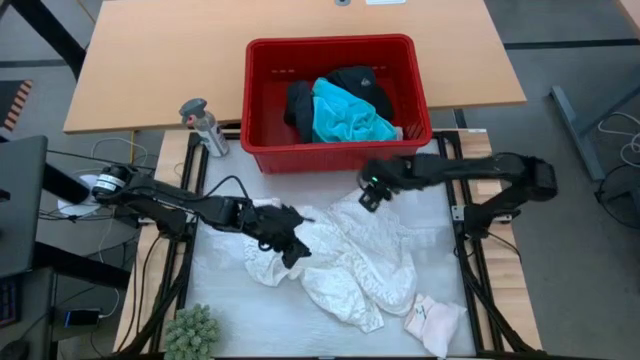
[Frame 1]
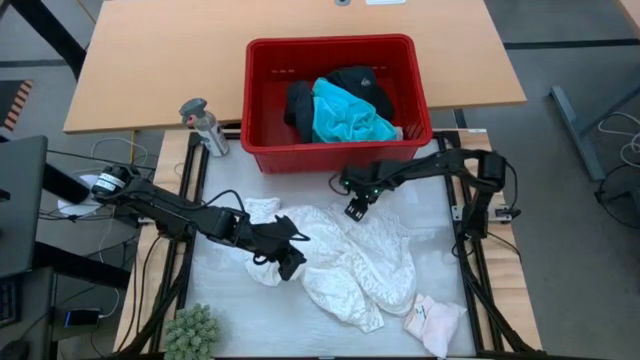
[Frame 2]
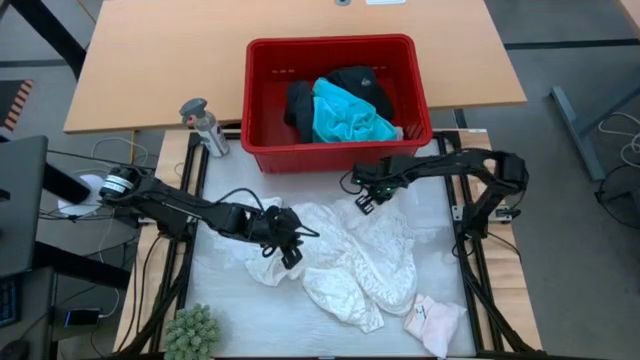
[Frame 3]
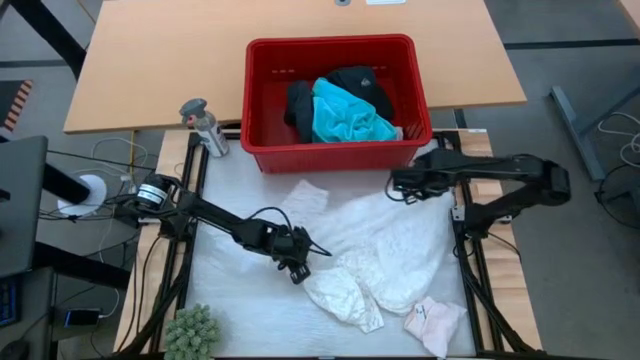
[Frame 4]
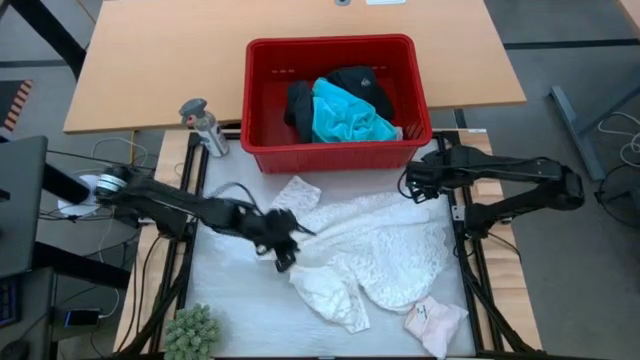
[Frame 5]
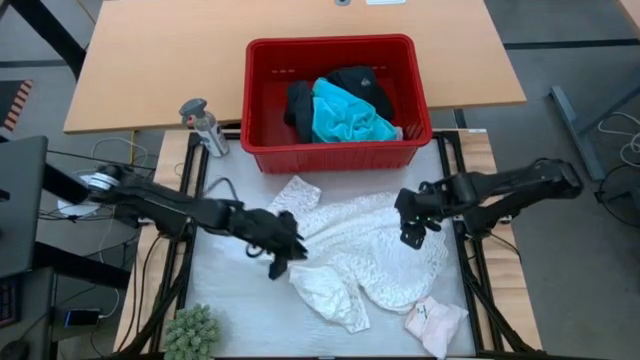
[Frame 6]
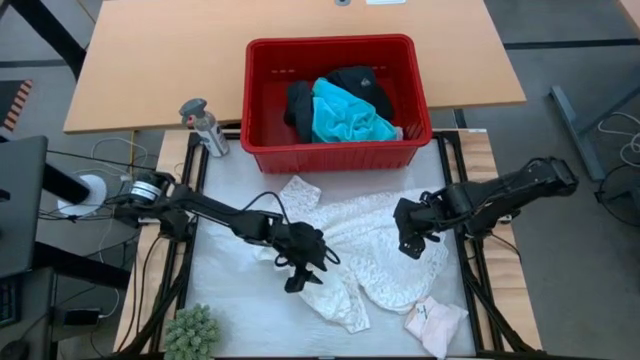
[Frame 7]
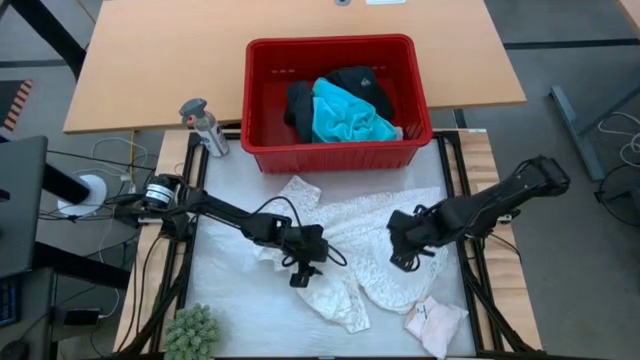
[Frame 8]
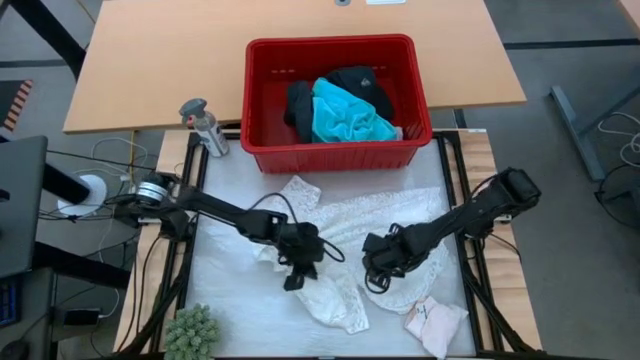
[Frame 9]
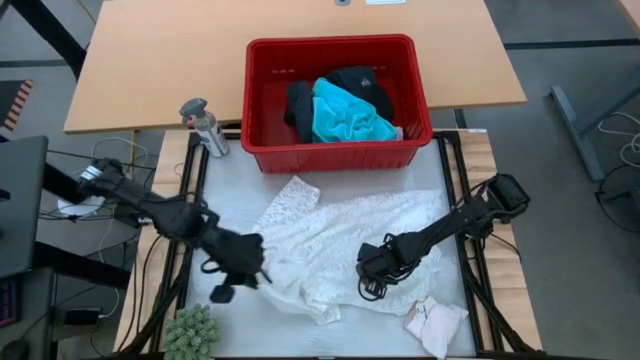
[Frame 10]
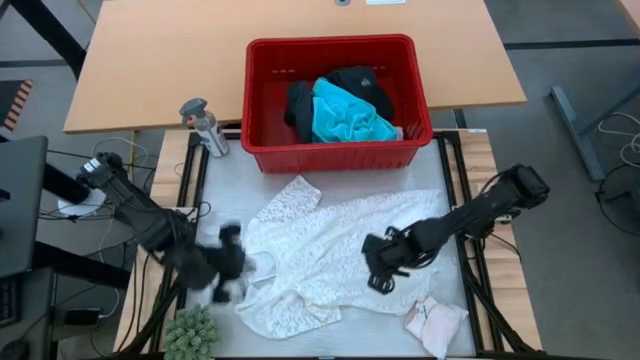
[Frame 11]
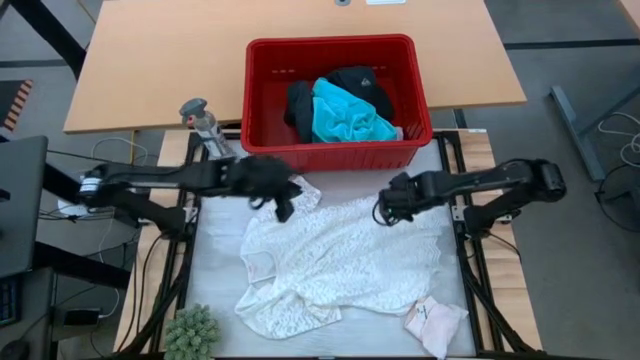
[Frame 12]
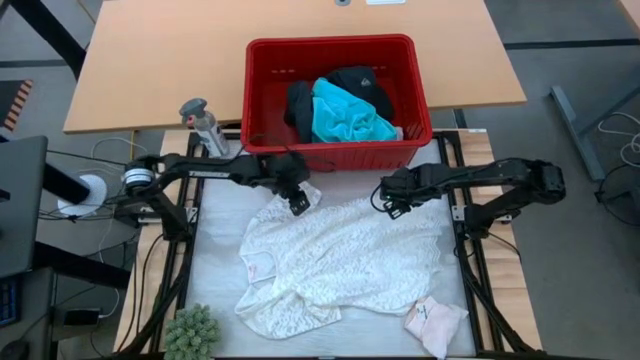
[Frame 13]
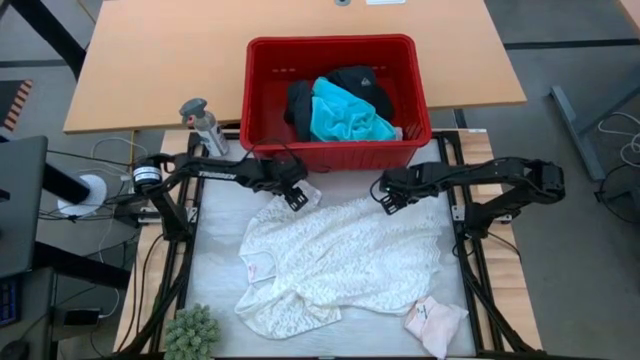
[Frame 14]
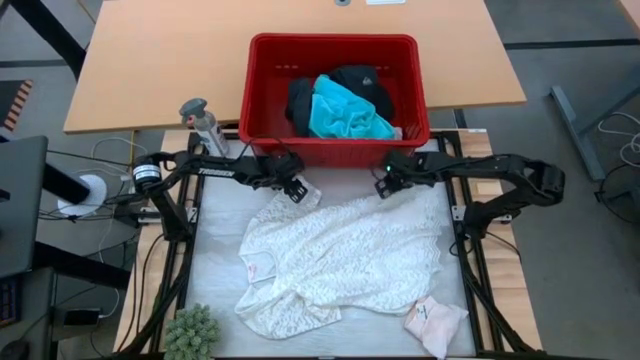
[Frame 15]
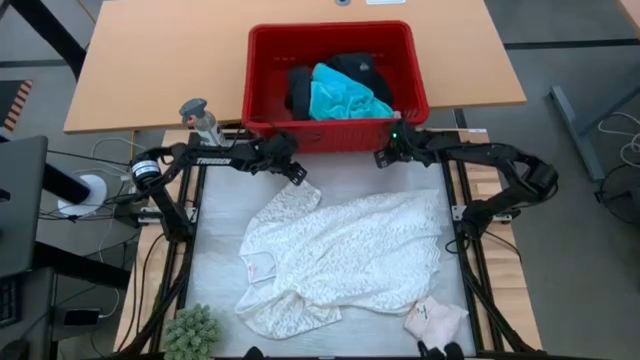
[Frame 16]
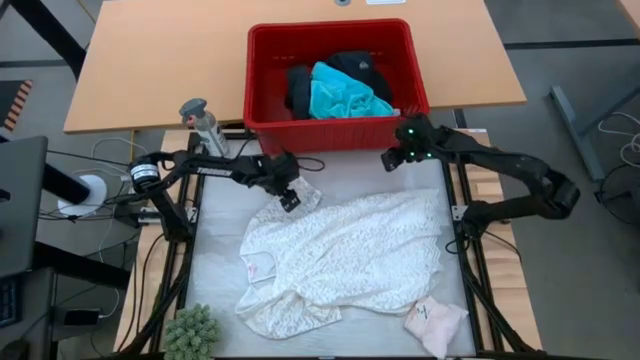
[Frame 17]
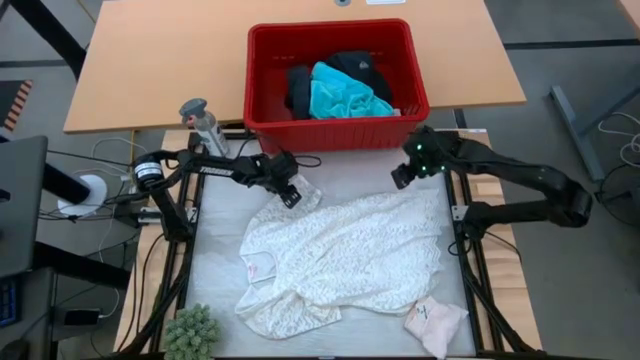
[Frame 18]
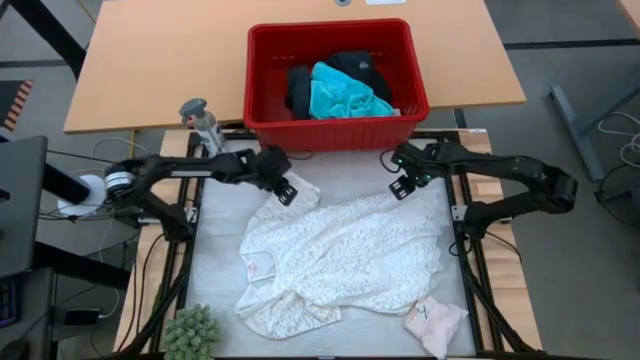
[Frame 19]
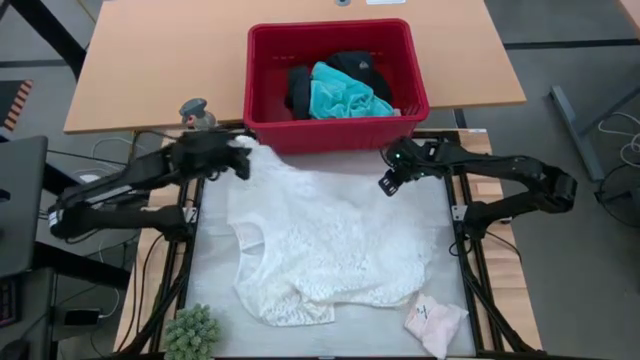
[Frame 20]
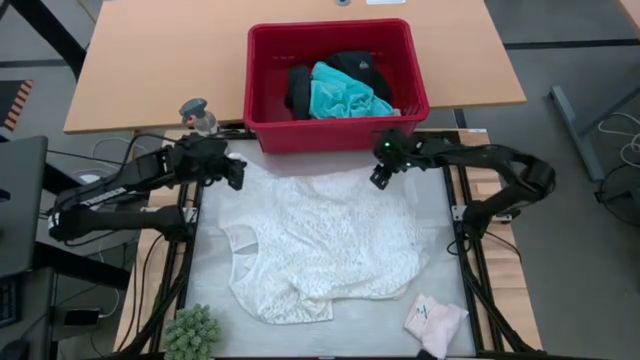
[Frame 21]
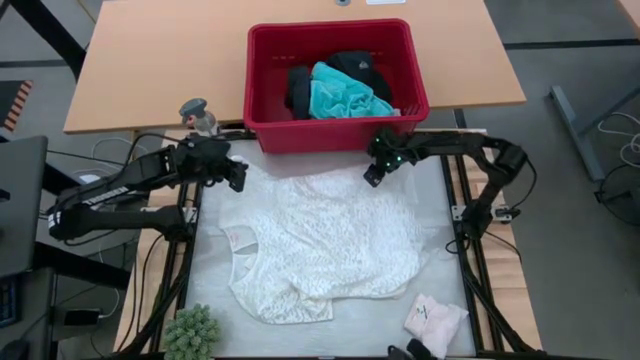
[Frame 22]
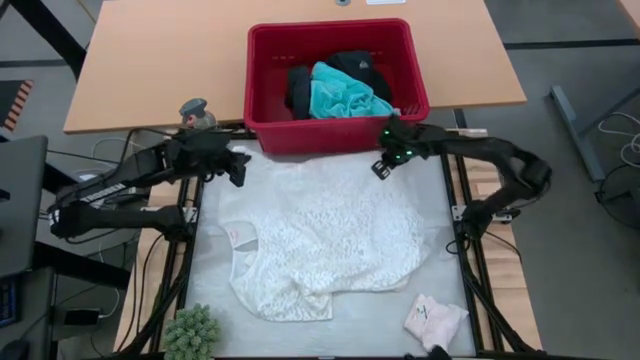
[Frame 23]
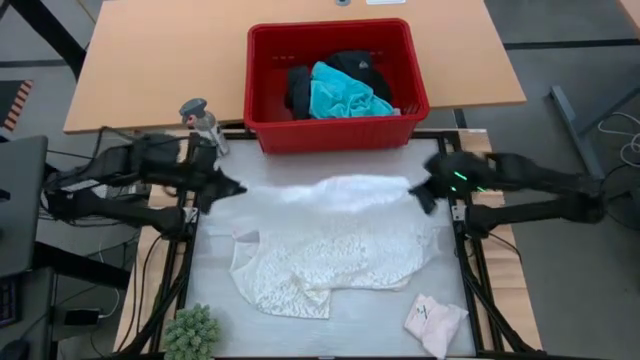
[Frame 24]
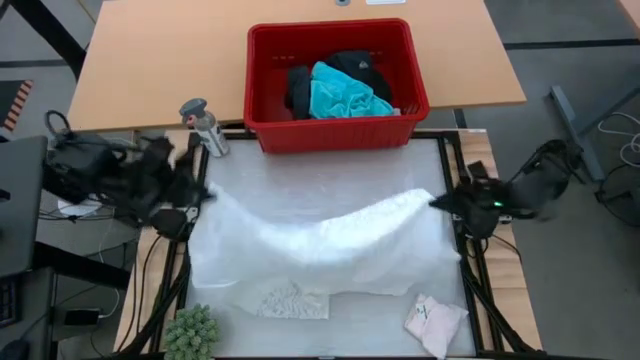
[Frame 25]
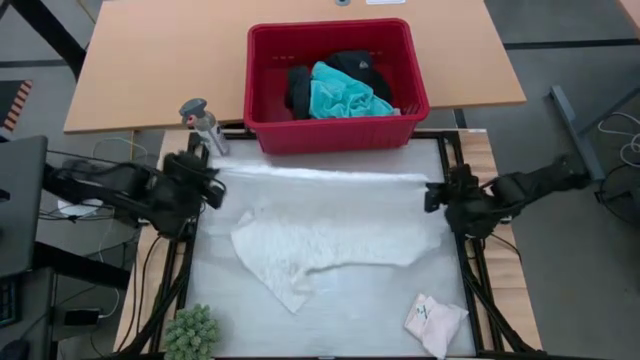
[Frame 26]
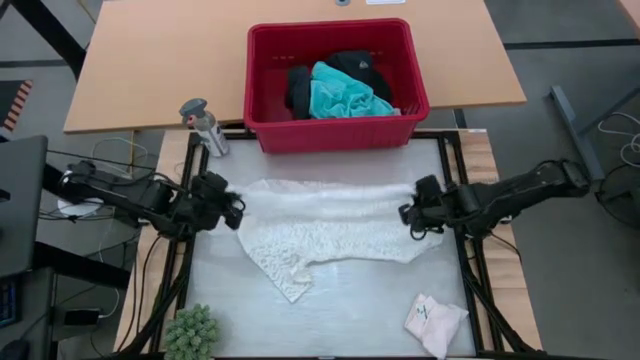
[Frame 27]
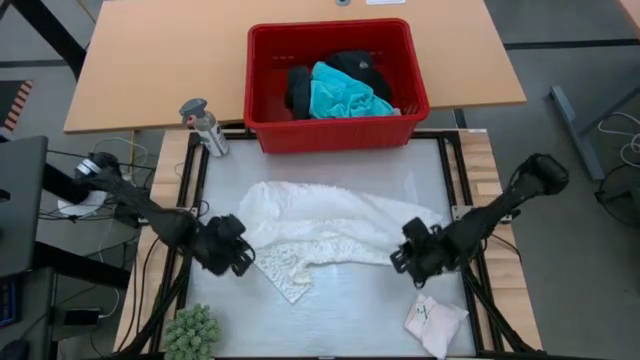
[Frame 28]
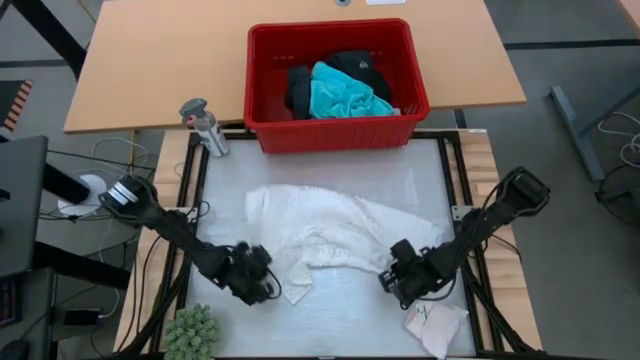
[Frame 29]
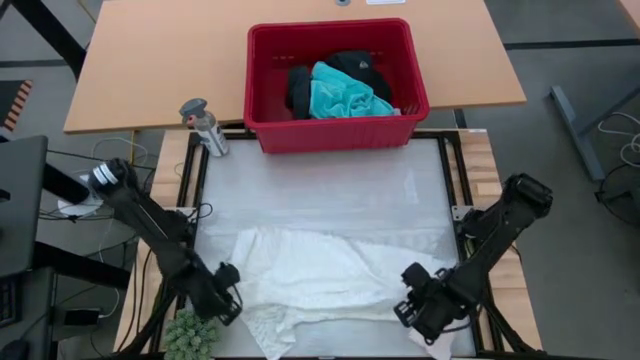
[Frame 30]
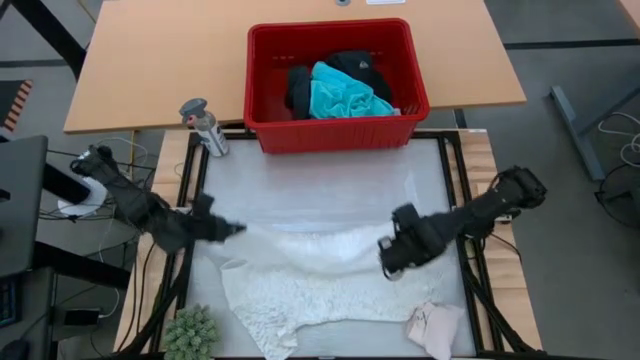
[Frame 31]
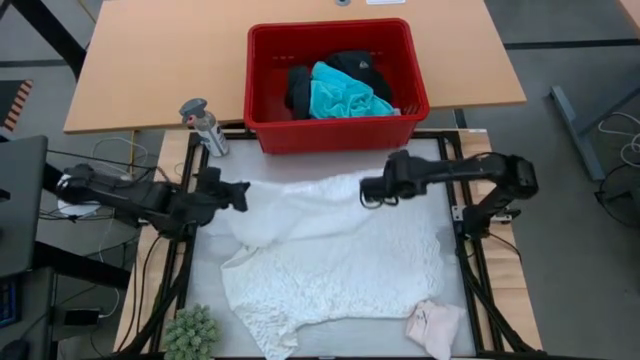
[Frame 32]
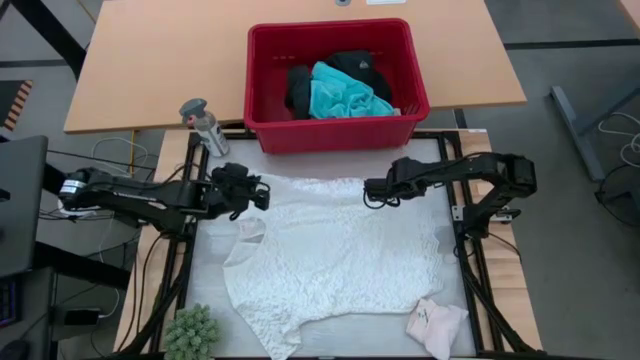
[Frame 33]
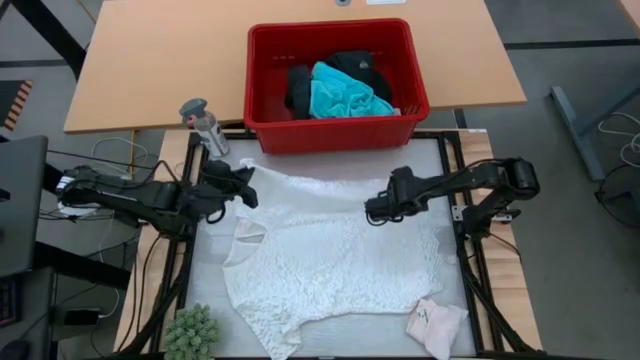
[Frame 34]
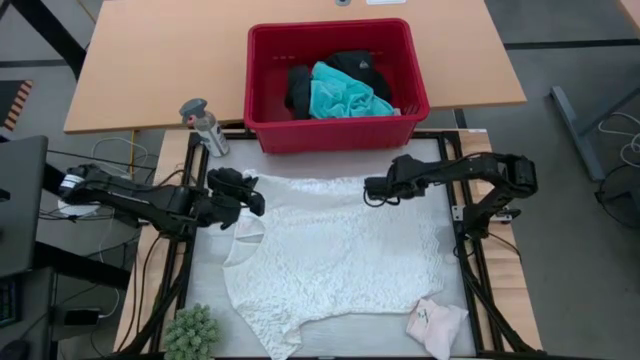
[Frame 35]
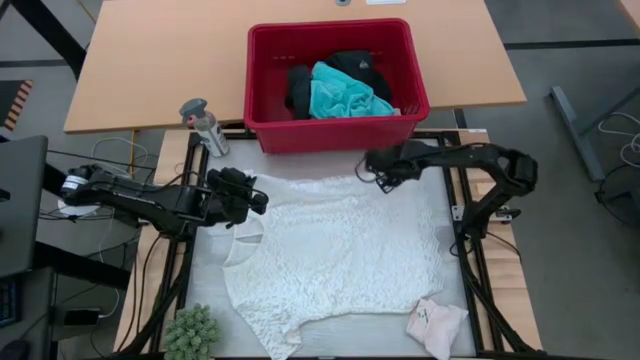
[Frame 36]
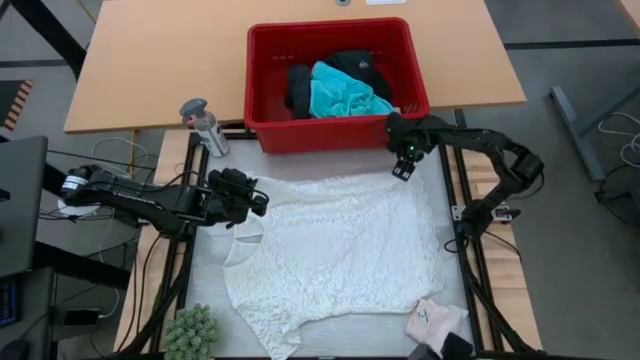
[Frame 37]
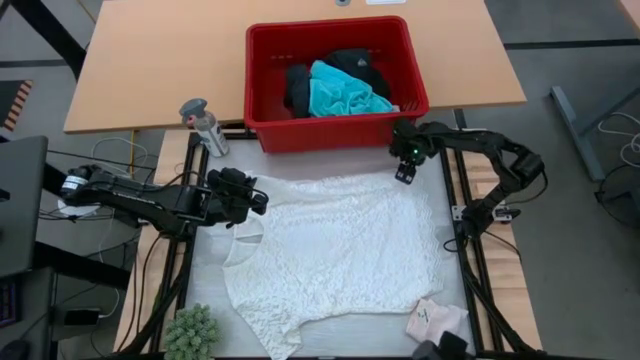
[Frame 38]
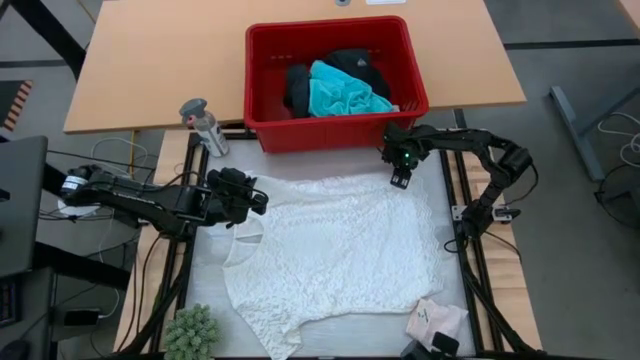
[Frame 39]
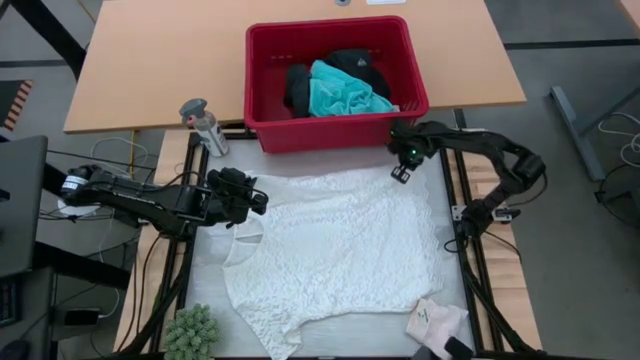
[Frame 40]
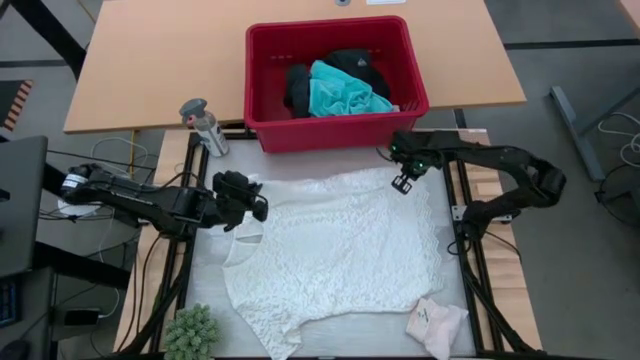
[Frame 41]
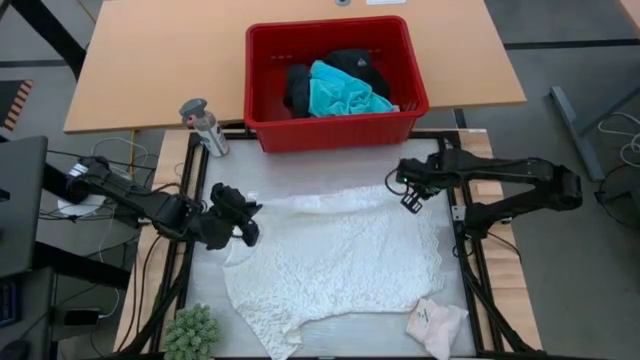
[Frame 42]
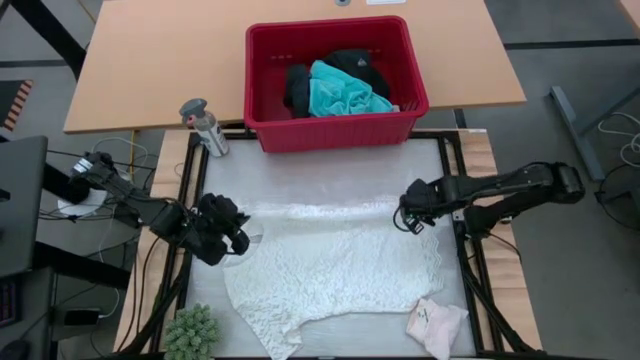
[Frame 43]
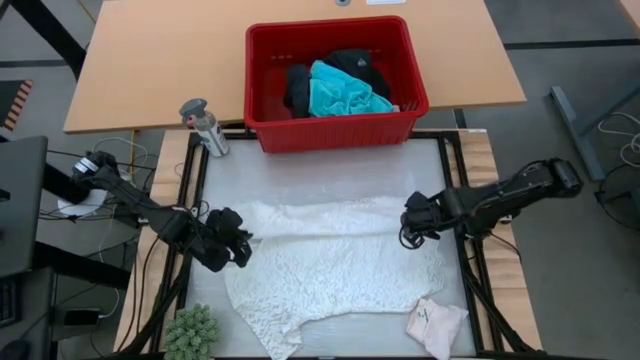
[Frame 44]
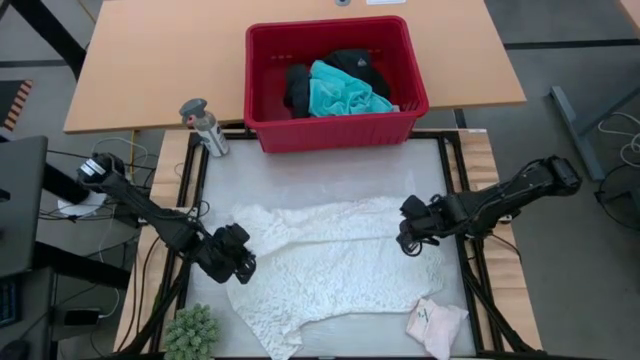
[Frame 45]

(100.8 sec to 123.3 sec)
Task: Fold Laundry from Bin
Fold the white blouse
